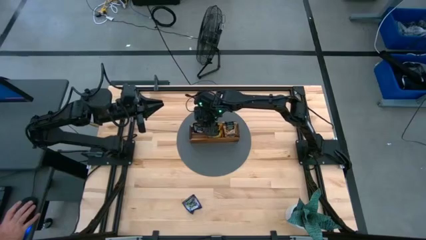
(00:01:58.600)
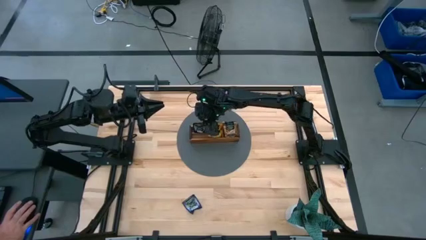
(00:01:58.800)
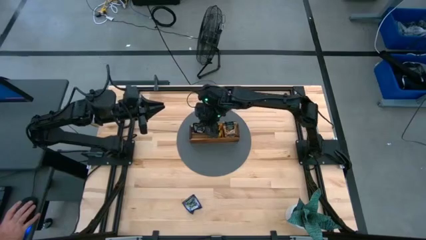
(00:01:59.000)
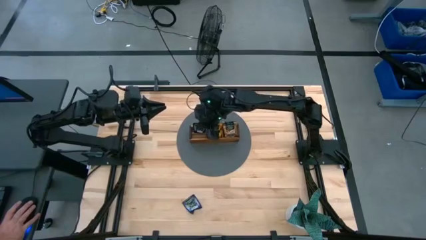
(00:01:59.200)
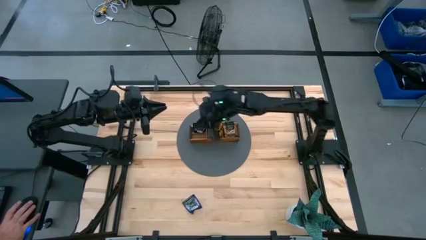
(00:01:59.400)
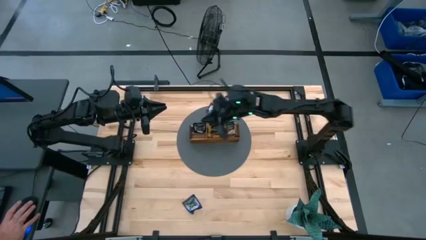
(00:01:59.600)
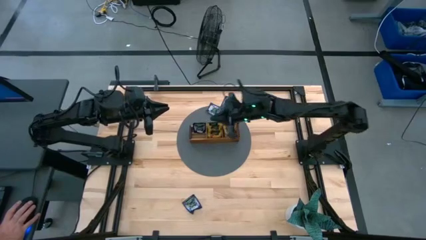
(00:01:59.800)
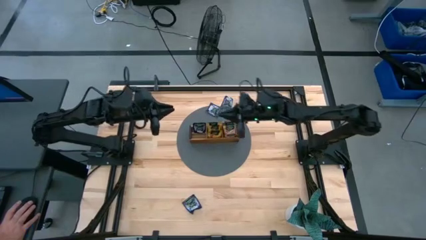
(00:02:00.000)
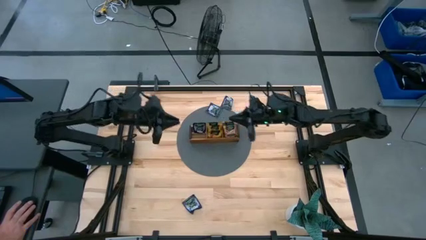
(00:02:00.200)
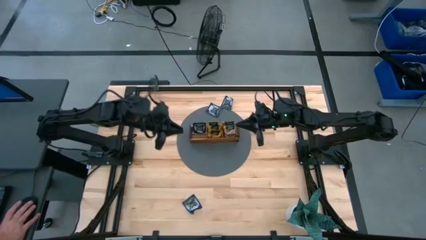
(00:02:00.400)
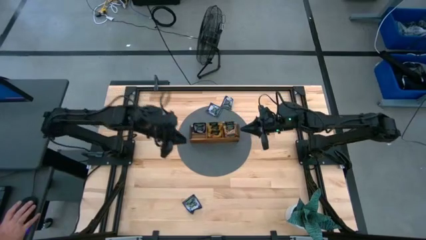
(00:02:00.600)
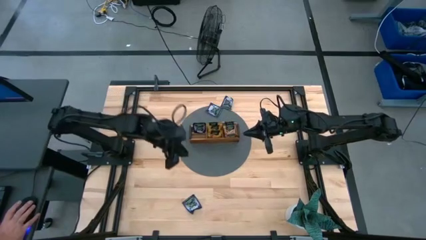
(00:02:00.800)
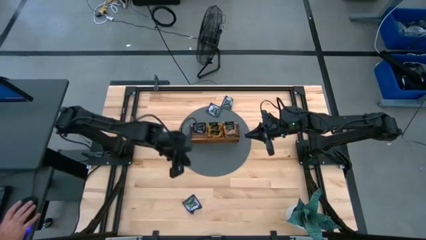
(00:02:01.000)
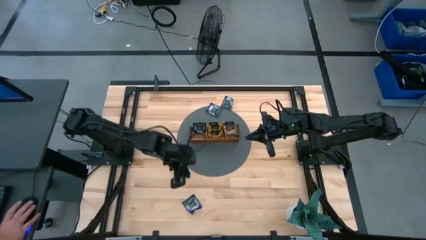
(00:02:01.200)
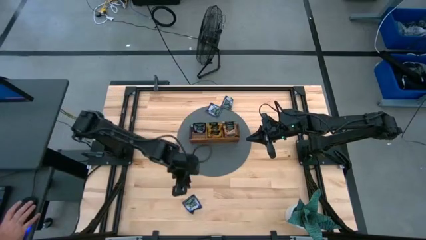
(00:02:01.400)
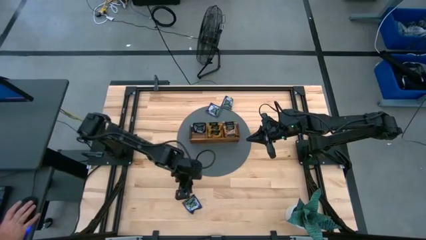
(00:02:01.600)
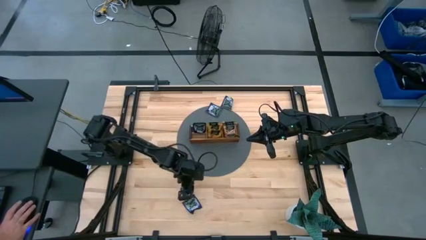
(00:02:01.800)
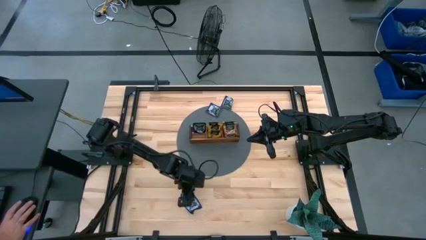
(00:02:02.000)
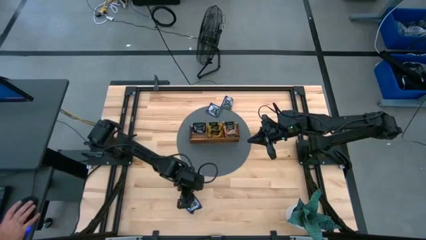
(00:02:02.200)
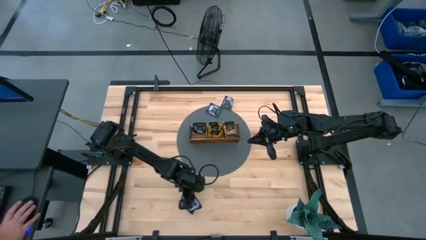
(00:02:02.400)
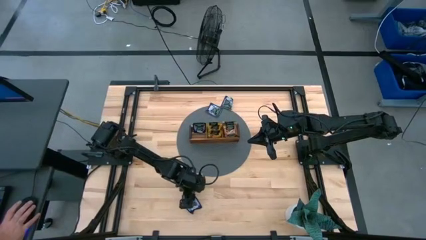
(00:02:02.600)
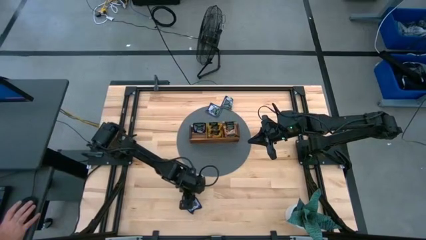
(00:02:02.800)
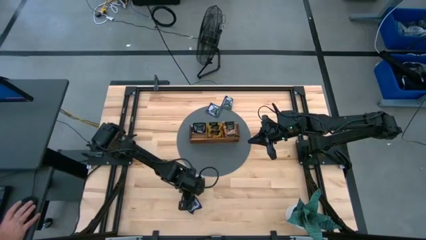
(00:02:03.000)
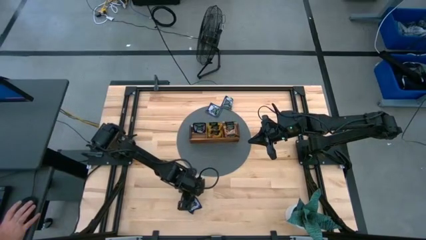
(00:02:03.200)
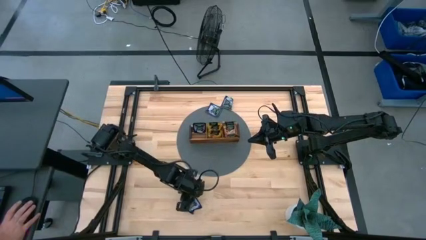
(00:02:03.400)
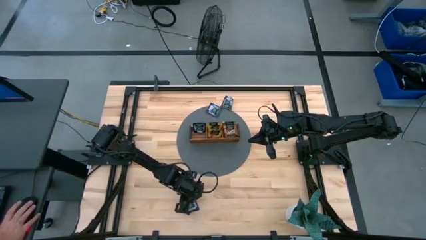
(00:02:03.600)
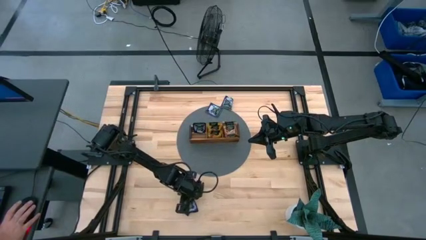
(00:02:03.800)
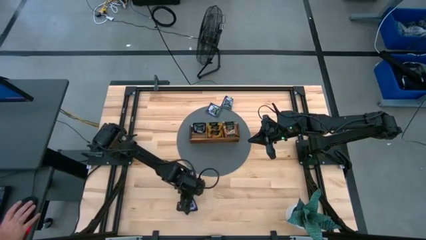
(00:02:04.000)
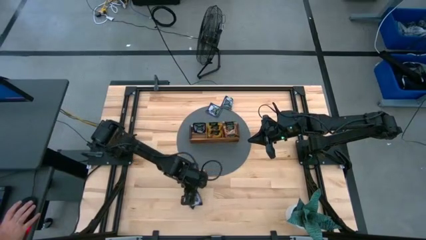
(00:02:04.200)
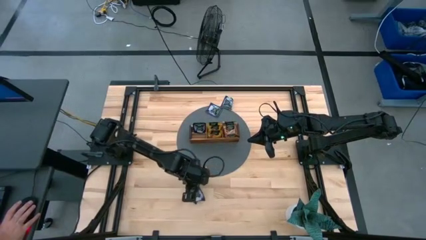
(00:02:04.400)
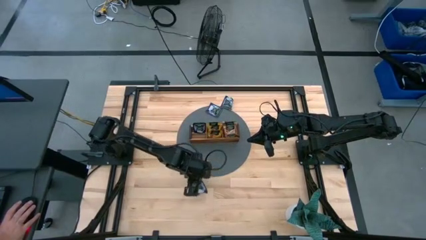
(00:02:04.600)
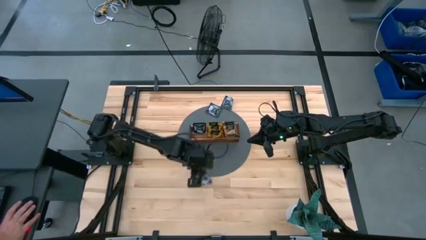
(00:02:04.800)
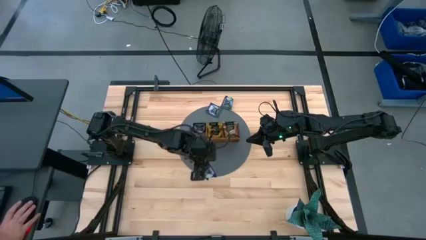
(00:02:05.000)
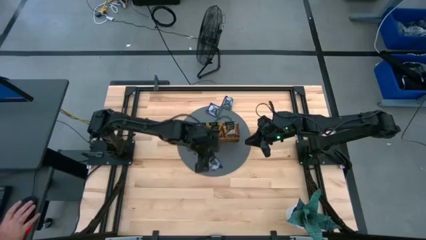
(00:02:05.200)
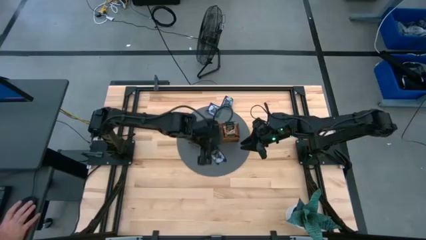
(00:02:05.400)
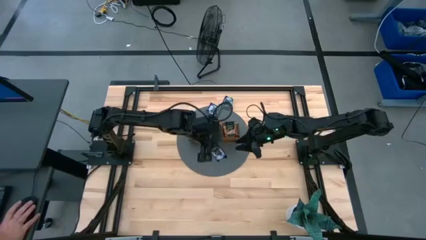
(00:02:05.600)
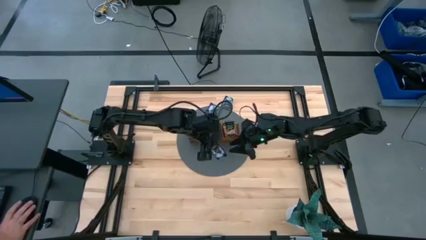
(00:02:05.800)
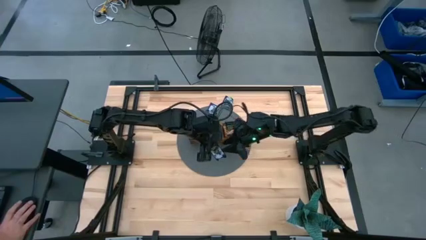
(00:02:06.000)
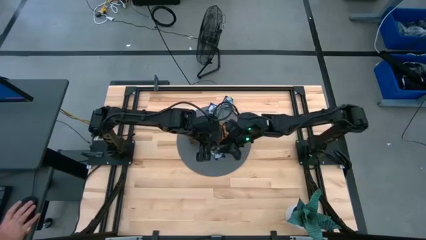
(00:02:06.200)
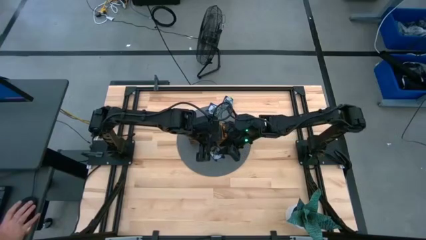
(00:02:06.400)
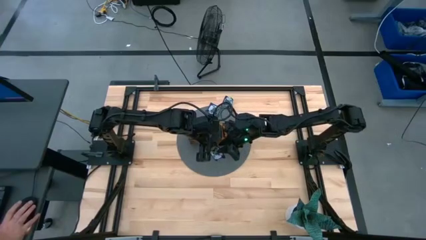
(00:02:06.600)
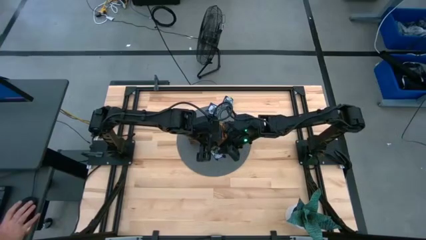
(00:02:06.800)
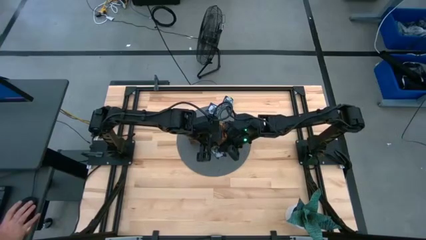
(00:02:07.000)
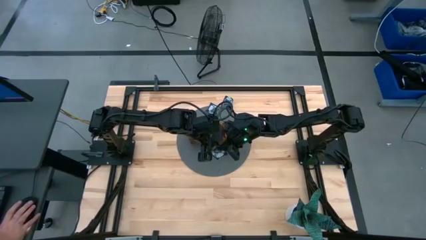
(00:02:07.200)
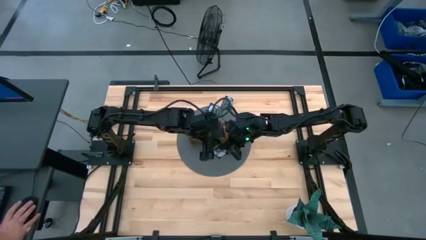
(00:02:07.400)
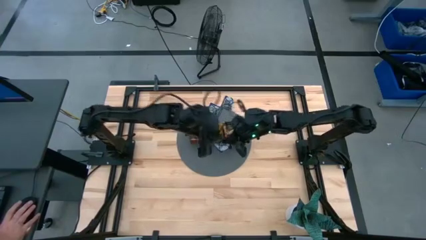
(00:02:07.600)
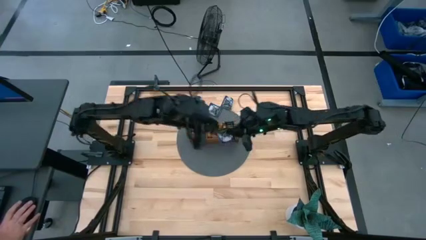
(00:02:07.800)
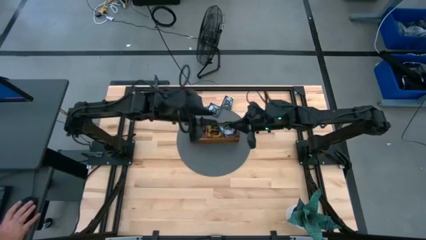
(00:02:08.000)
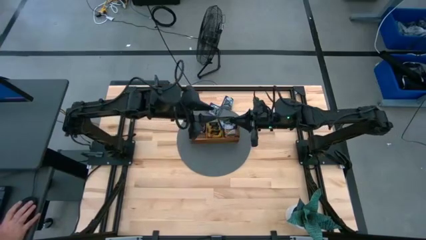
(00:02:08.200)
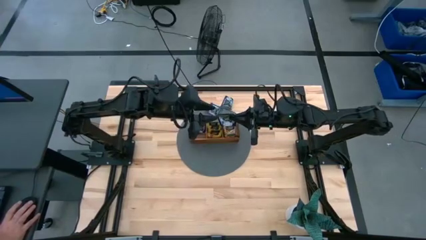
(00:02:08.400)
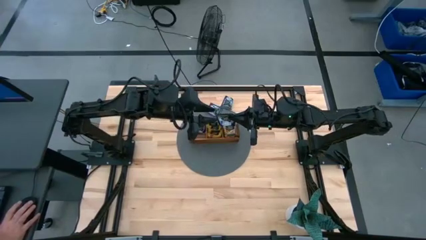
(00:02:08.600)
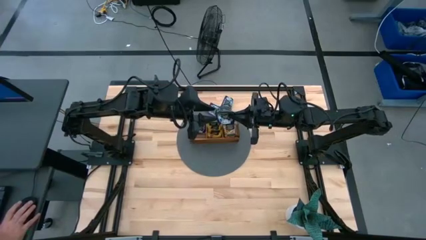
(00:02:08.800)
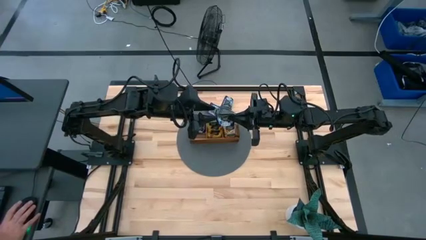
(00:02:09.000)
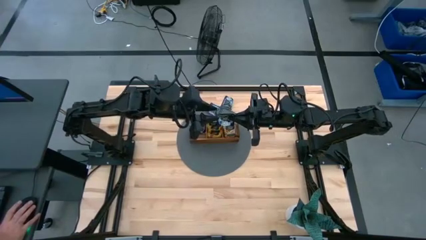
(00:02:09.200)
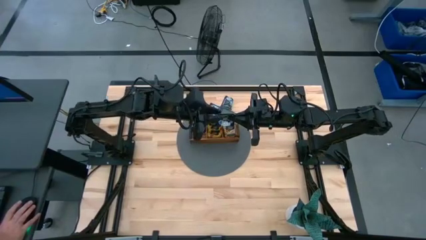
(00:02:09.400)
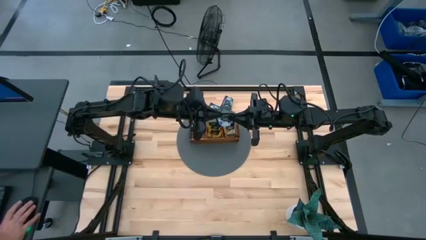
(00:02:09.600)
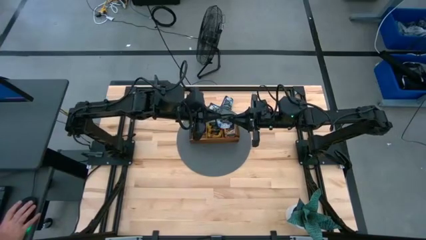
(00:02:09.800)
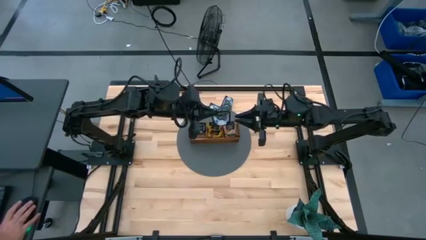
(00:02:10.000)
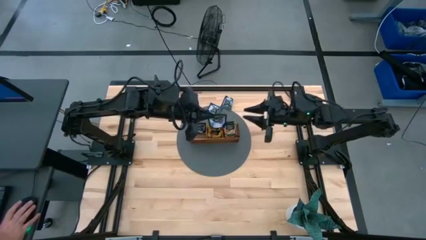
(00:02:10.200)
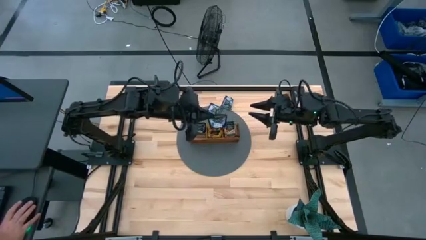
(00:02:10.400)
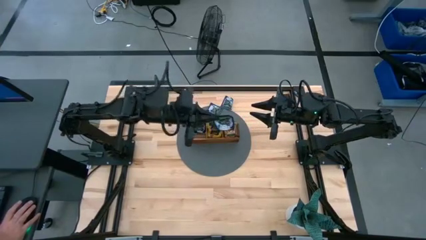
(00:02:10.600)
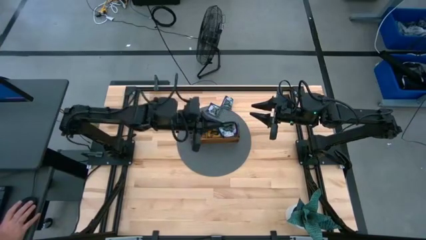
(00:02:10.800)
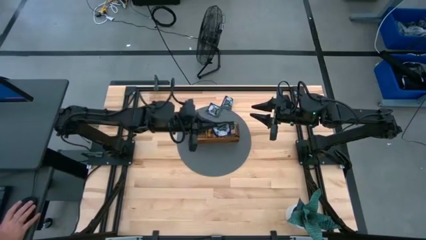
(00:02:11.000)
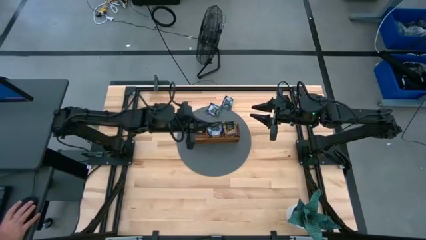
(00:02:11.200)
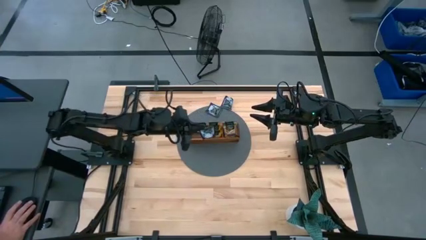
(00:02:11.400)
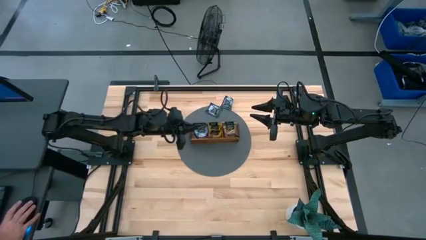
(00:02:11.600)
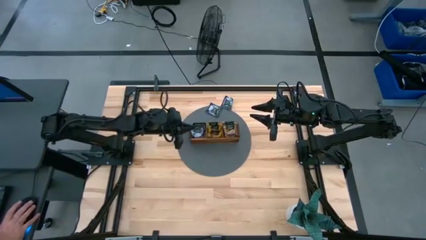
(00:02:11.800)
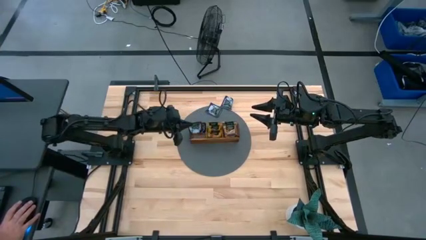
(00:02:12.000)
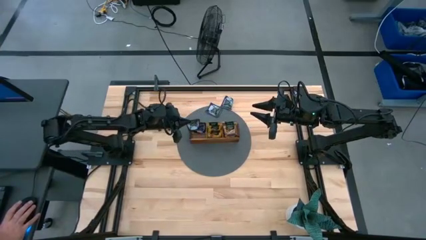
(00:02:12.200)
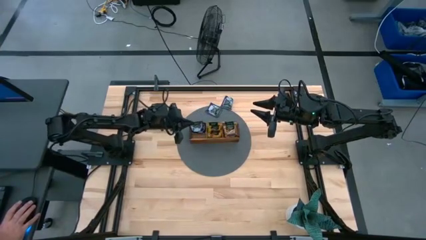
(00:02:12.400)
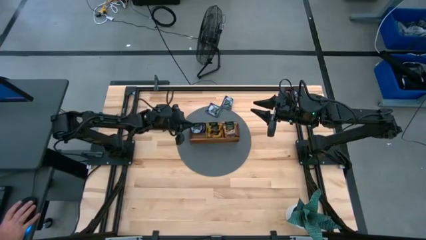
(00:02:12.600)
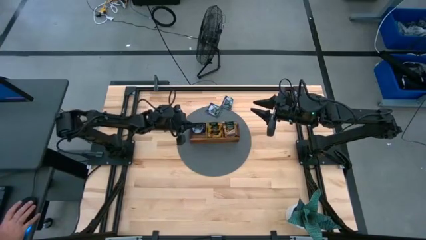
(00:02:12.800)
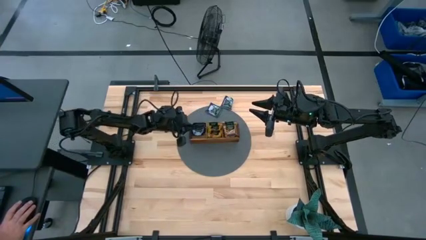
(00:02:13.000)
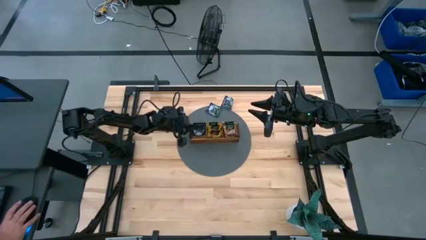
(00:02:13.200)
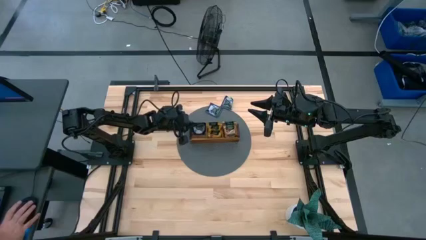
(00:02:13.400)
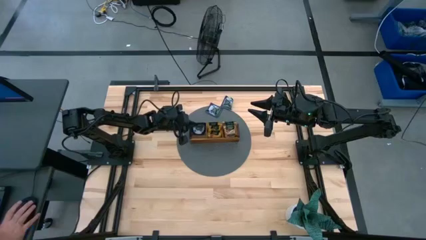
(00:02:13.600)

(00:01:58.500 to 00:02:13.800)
Task: Pick & Place Tea
Put the violet tea bag into the left section of the wooden organizer
